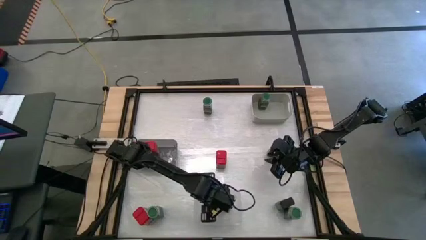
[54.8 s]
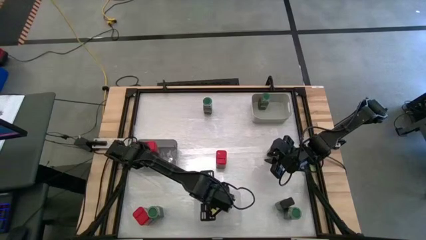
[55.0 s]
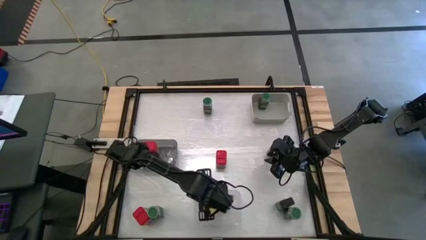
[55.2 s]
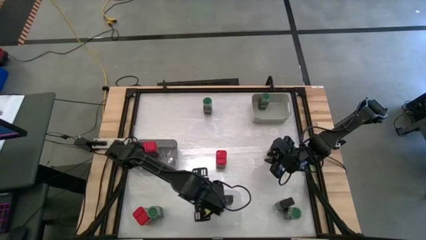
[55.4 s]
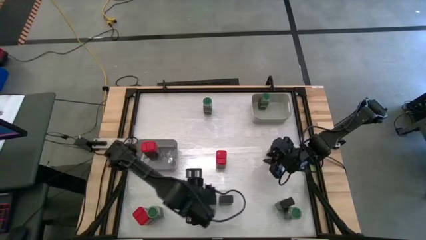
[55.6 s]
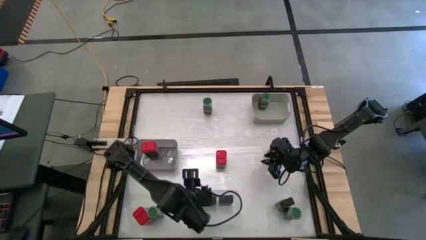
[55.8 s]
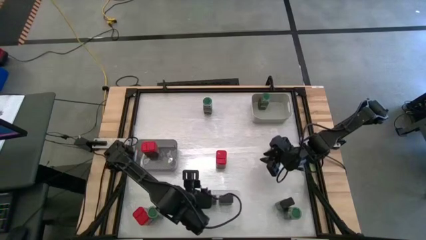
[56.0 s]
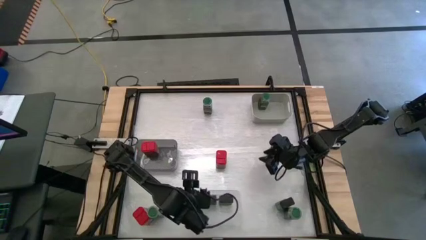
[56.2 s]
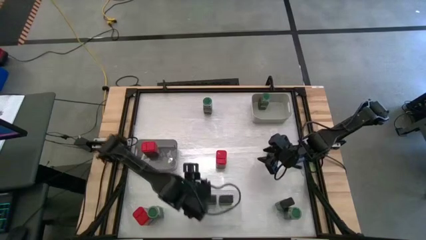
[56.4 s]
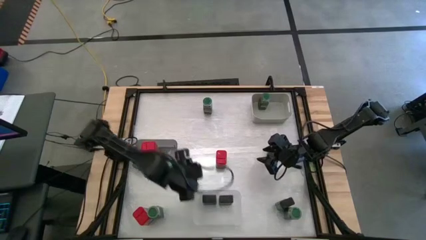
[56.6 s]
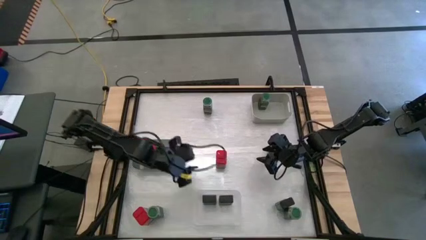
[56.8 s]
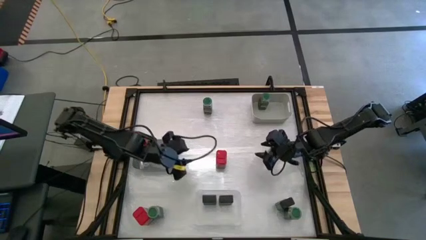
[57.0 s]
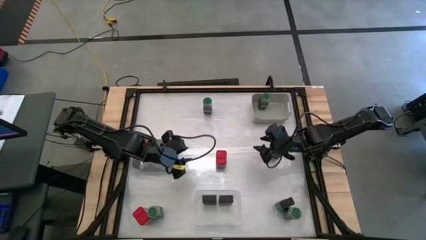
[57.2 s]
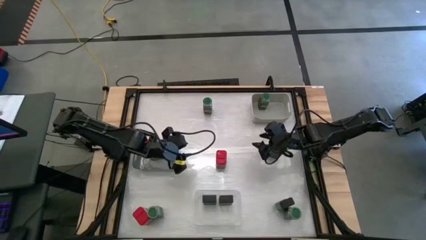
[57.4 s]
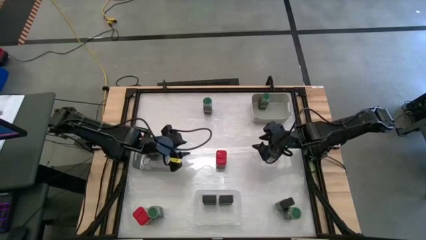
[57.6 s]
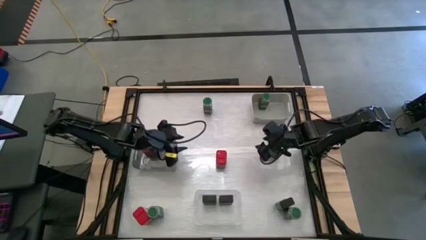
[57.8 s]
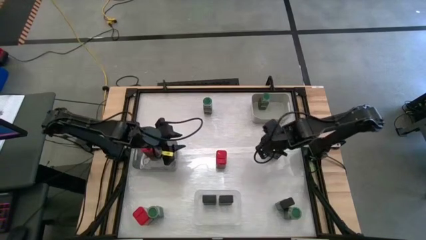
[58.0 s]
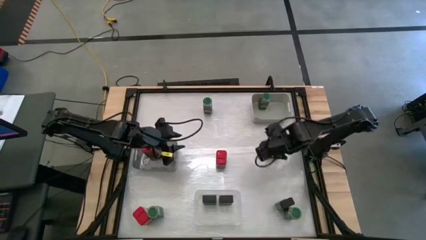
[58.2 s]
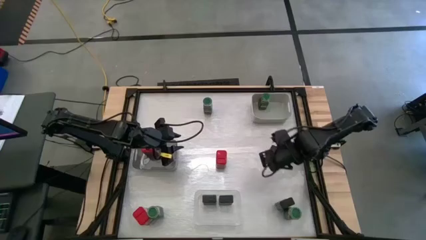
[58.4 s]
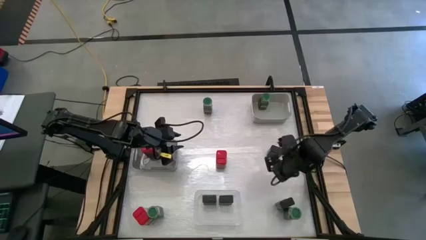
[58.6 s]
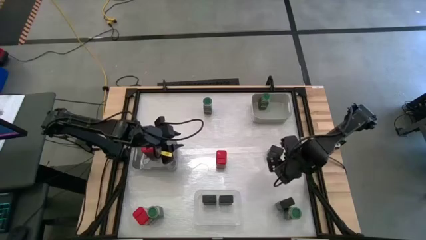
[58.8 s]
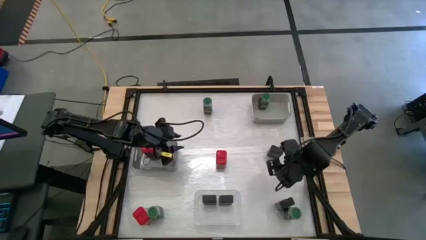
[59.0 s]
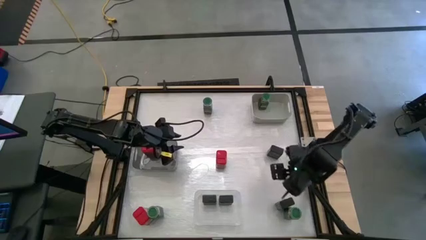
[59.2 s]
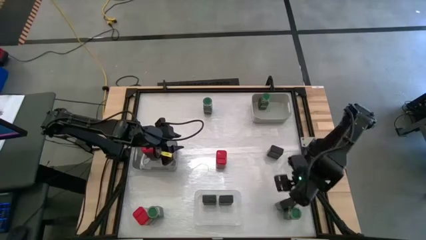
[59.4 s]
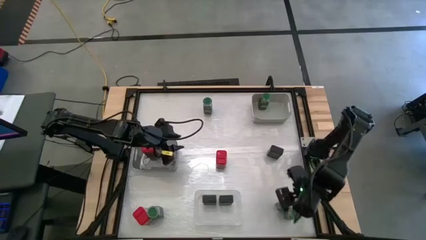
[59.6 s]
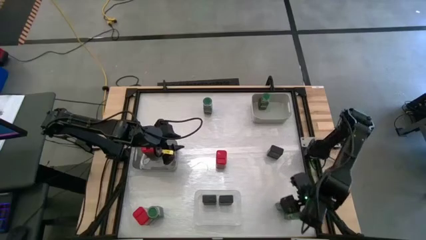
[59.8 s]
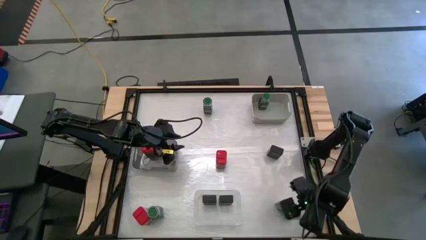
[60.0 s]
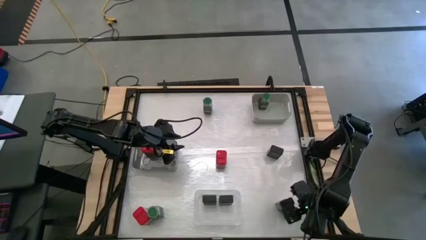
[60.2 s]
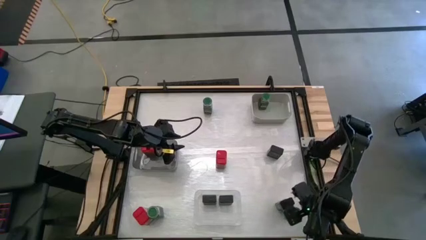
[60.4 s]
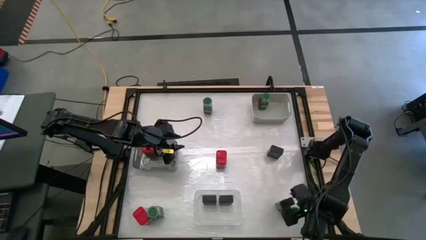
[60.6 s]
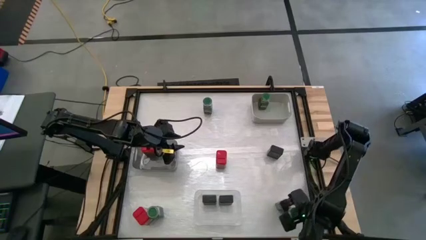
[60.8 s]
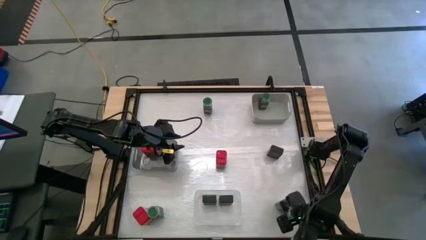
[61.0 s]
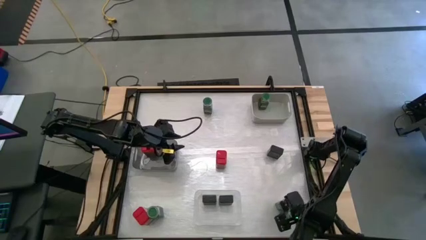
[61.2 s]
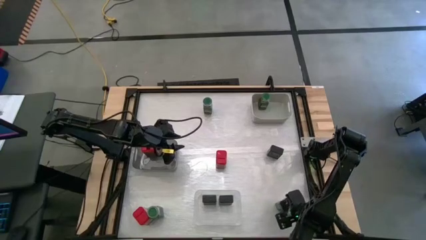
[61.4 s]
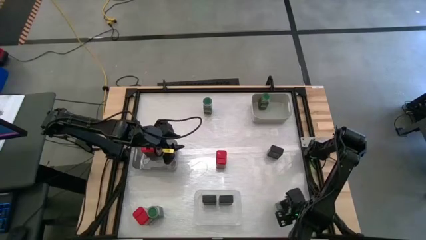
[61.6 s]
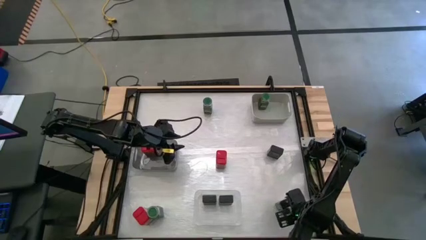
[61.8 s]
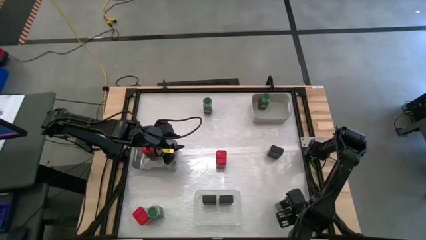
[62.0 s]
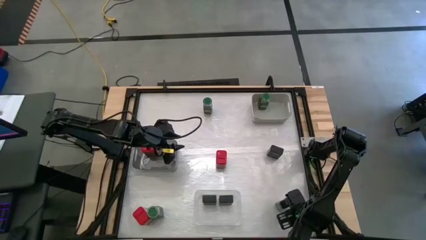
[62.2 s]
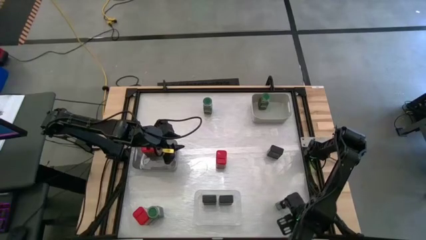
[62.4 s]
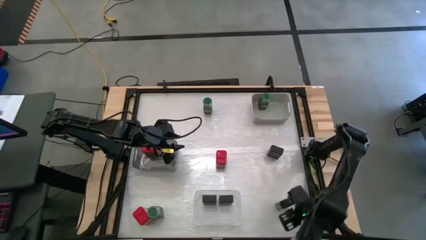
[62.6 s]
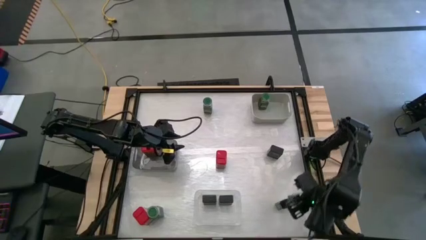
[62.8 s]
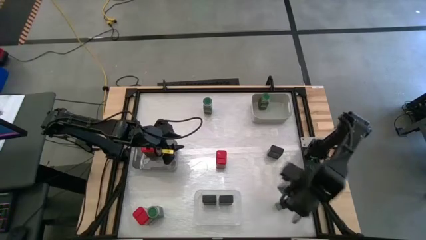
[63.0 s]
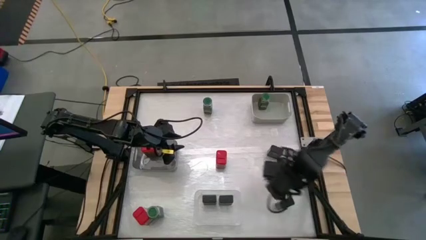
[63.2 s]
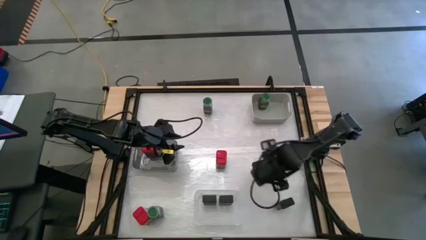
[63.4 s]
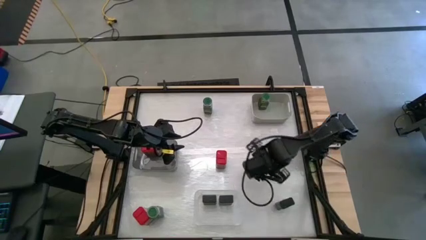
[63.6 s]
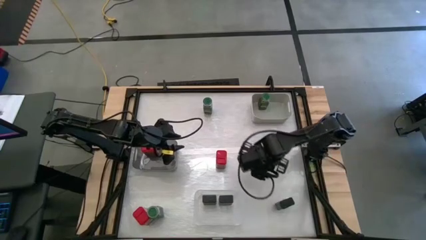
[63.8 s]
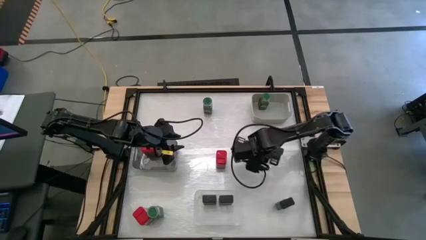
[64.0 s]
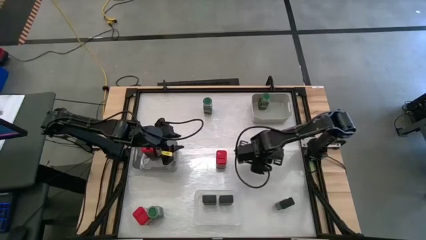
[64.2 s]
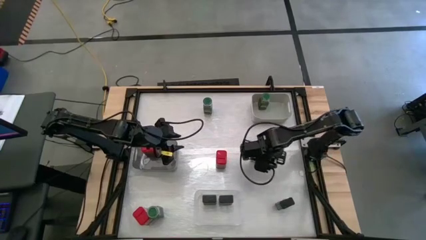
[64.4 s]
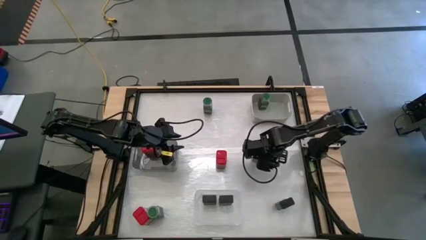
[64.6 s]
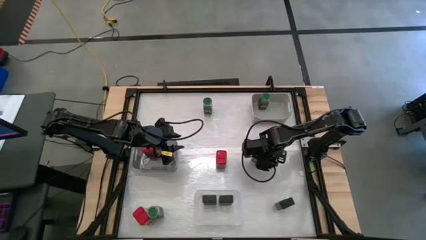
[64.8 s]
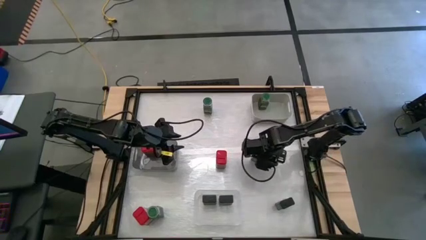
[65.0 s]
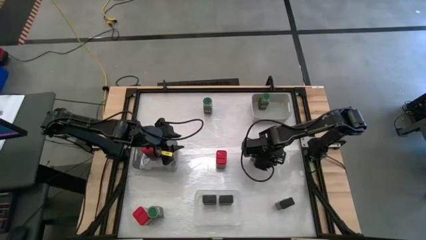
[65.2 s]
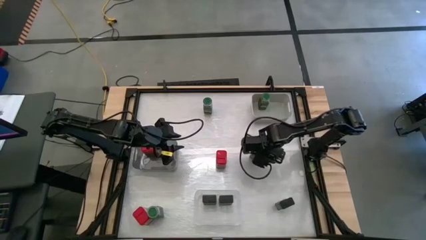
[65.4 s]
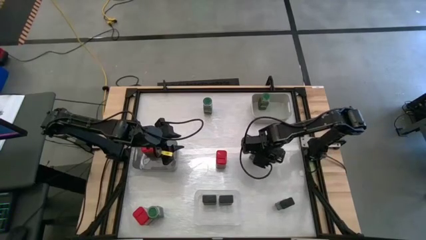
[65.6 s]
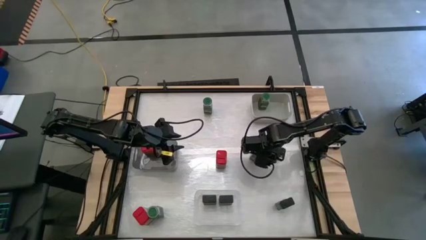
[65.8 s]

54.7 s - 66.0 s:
Task: Sort spices by type
Put the bottom right green seasoning bottle into the grey bin

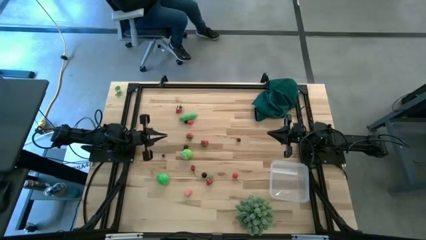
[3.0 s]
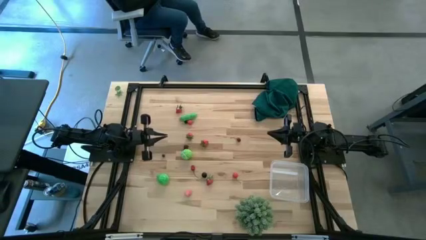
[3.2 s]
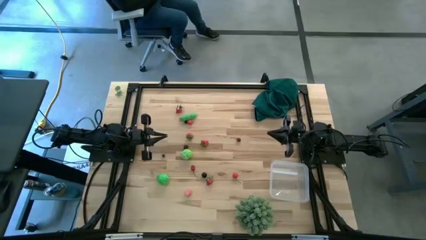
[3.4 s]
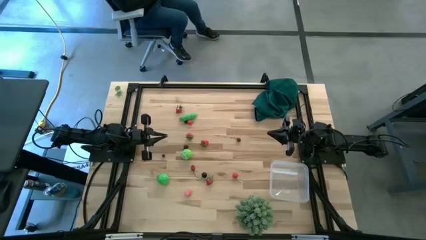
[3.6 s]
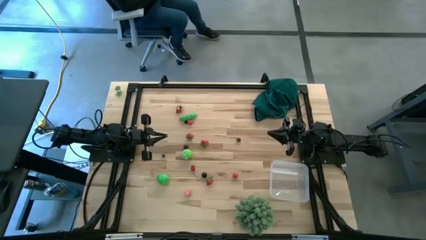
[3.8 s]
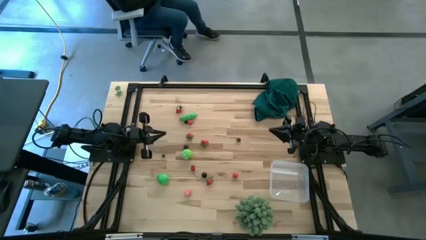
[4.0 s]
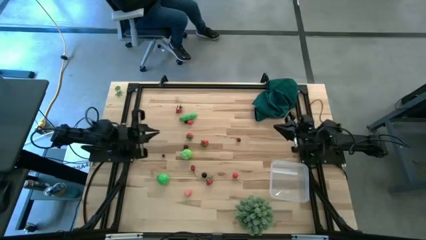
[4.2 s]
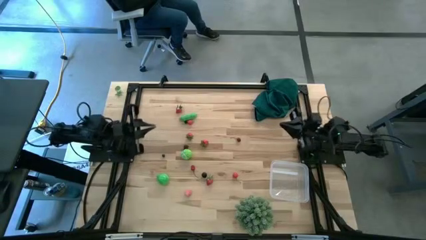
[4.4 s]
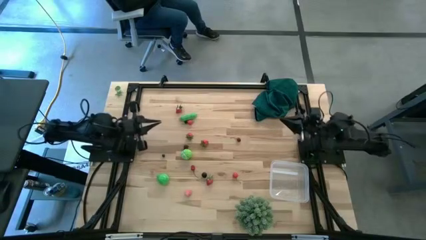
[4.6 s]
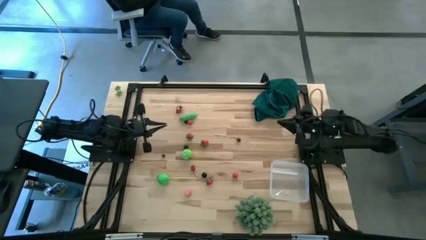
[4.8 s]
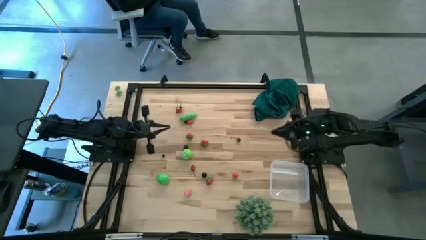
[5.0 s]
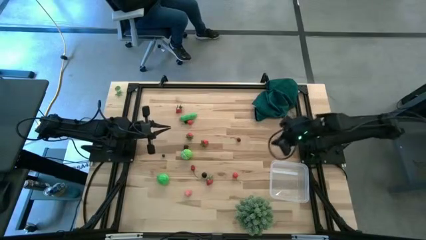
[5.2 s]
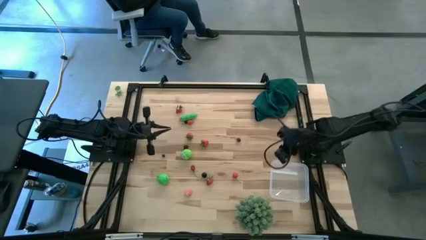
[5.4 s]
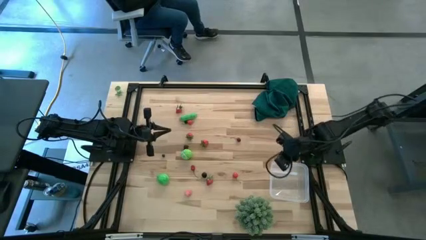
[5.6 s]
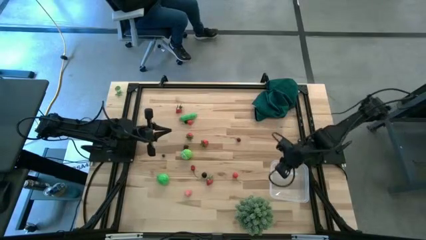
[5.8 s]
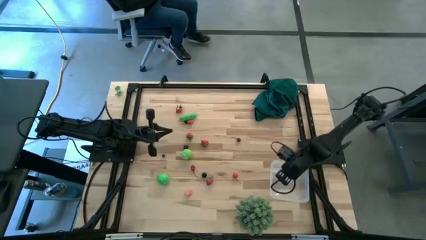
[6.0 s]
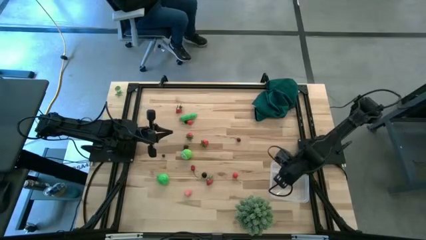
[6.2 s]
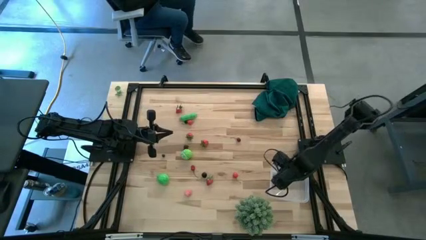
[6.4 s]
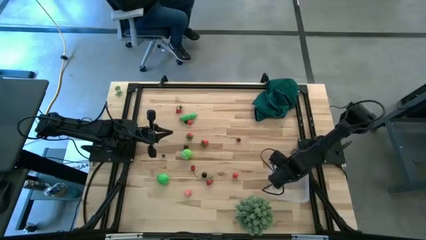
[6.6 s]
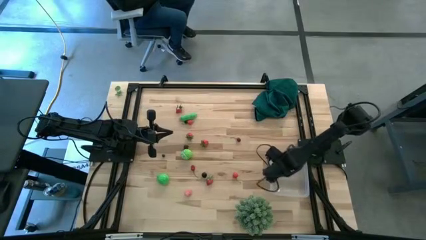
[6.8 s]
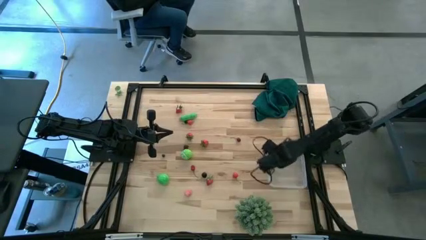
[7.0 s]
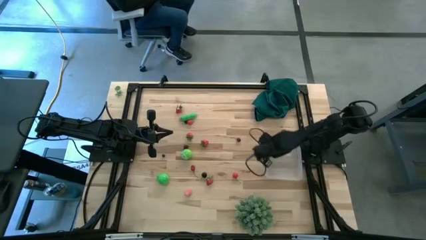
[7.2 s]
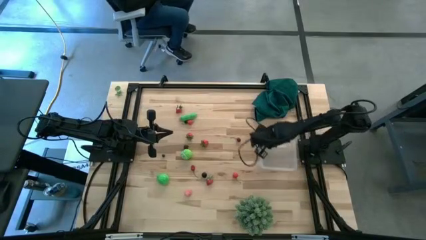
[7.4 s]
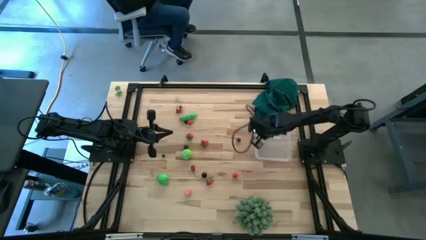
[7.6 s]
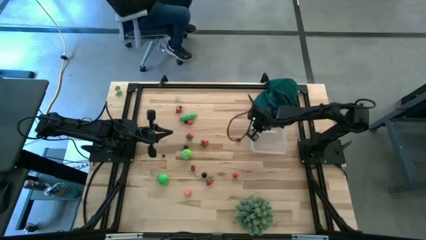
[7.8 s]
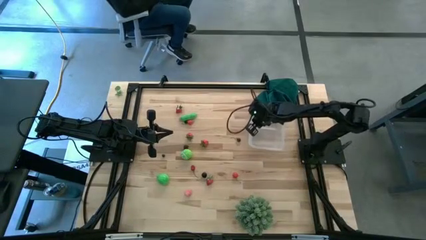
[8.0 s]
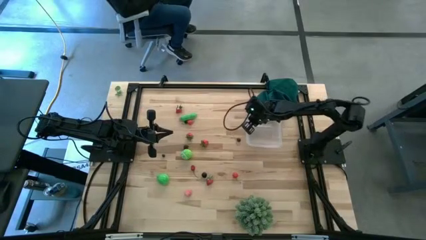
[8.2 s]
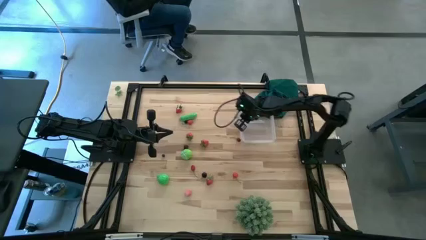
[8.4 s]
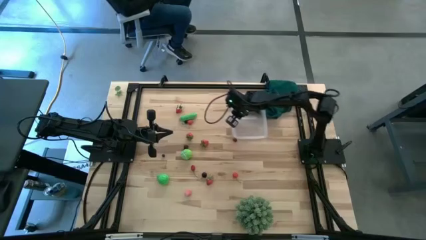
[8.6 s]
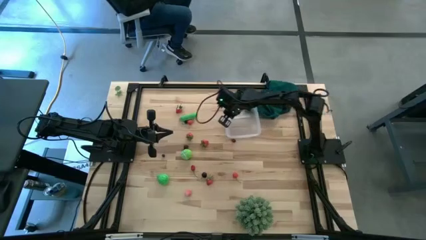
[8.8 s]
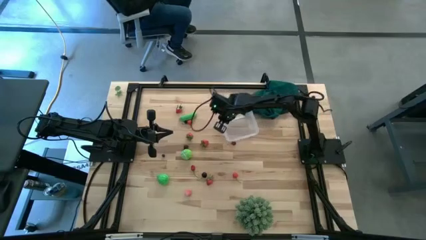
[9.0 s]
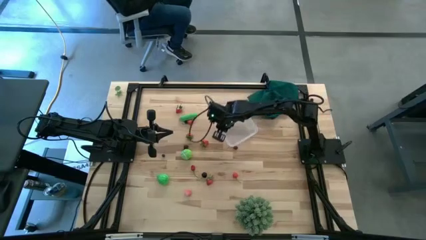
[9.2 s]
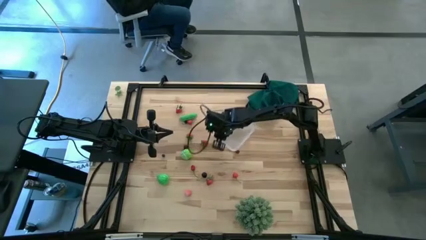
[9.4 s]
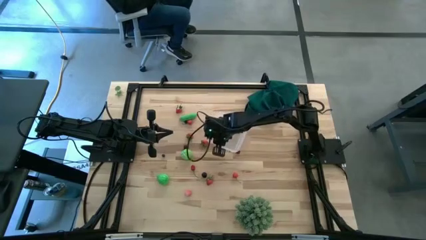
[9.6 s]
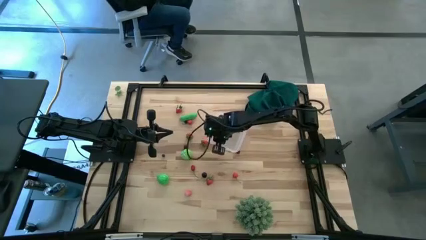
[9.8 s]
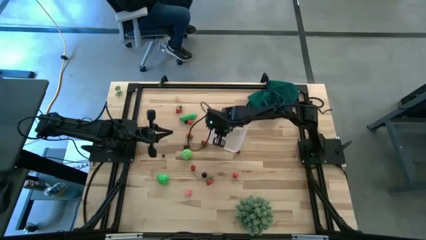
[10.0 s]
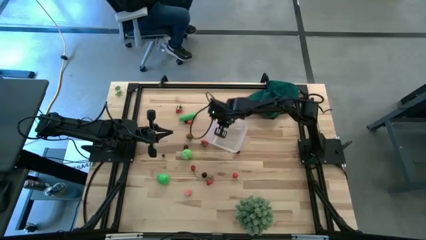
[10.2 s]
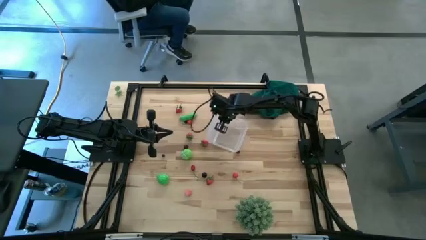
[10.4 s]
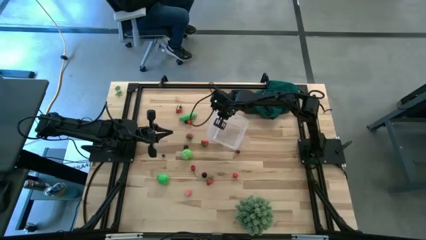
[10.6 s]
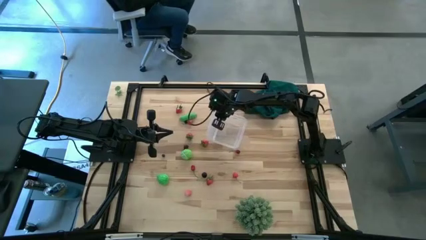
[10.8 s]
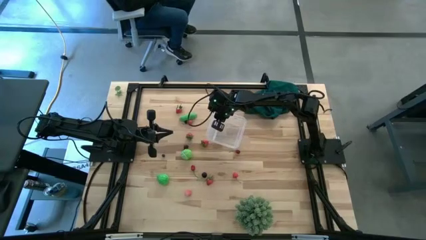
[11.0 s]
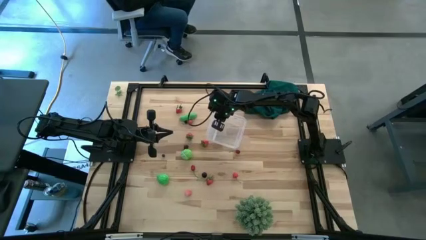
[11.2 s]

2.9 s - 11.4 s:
Task: Pick and placing Produce into tupperware
Move the transparent bin to the center of the table
